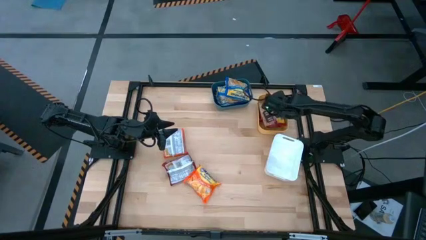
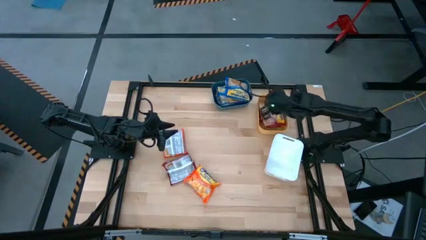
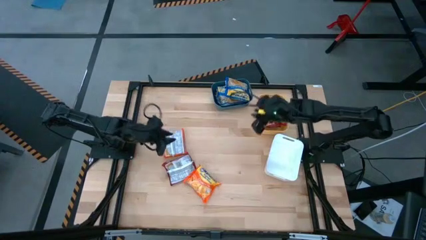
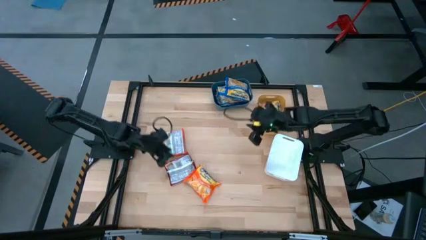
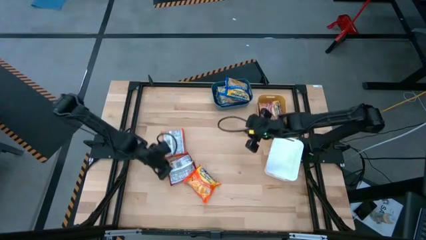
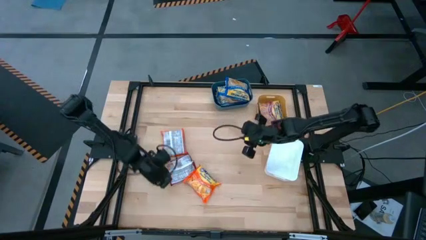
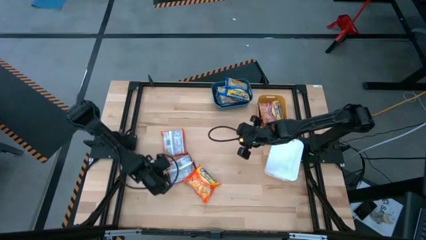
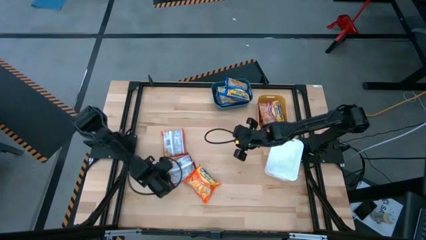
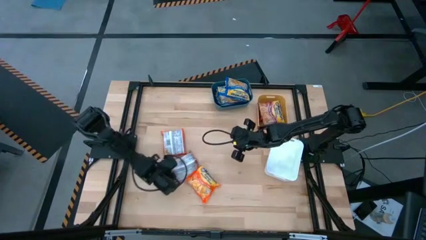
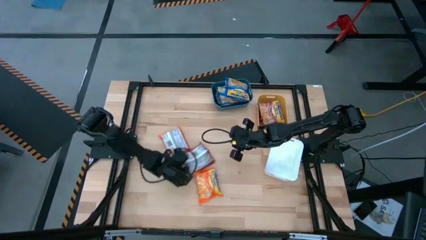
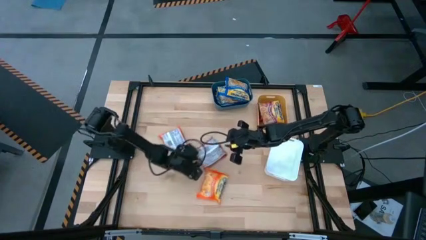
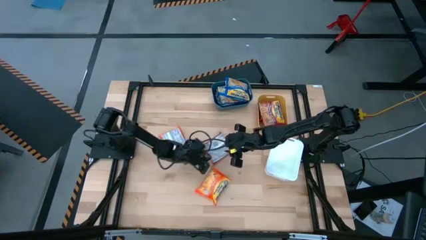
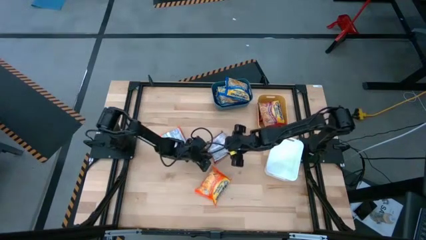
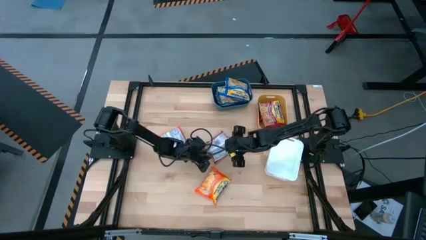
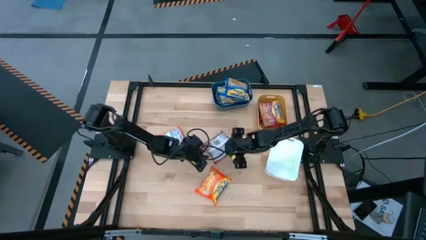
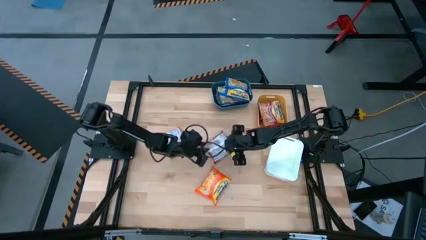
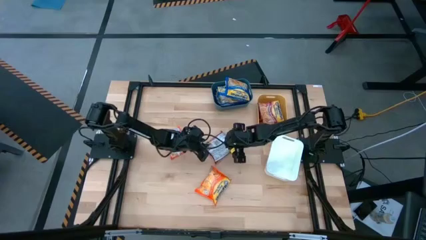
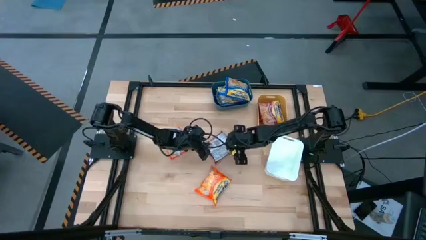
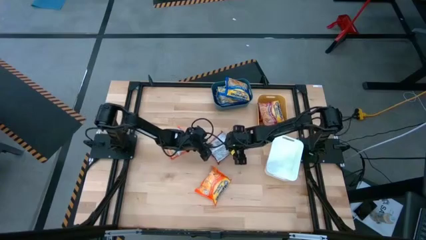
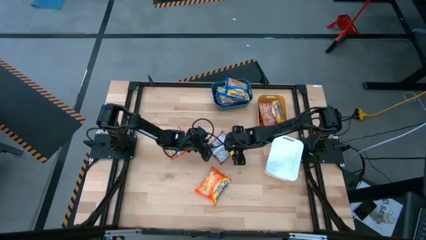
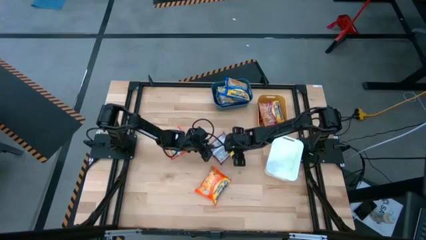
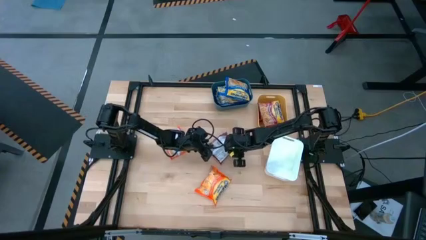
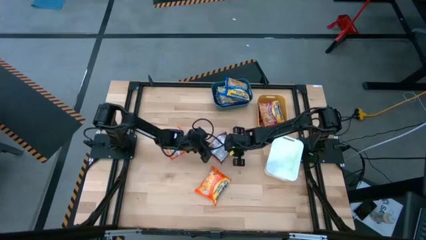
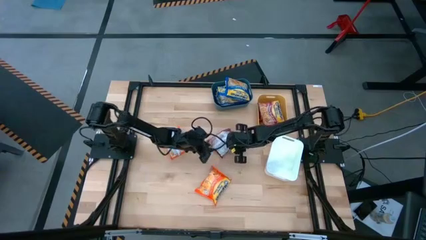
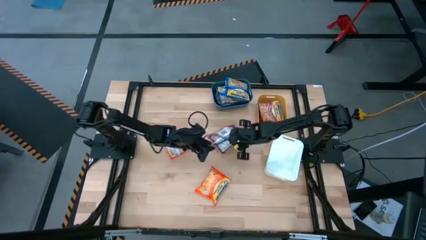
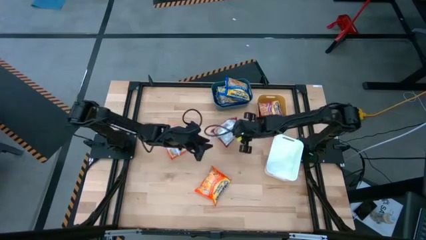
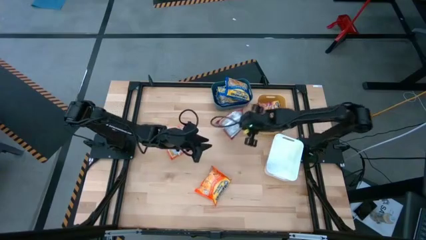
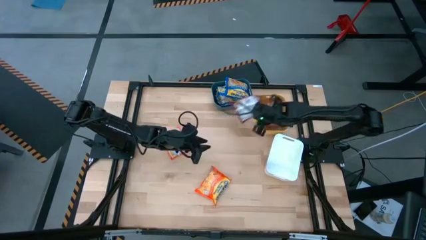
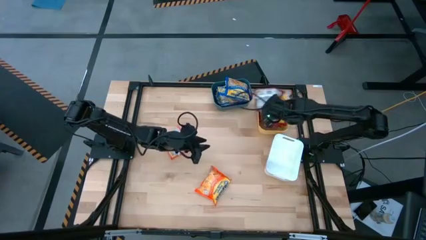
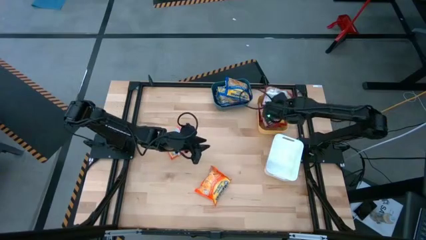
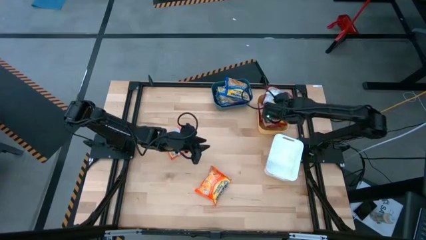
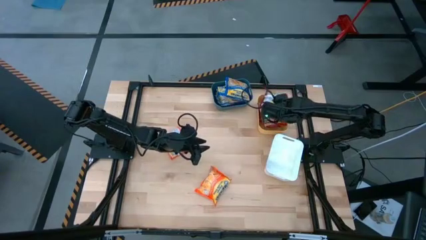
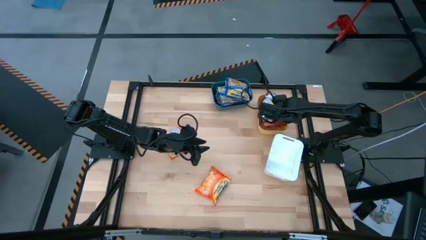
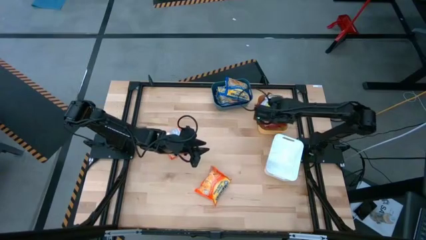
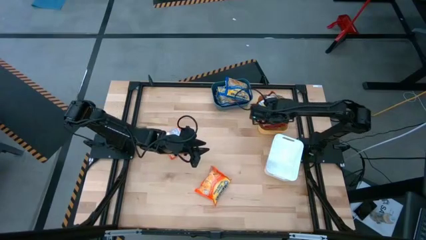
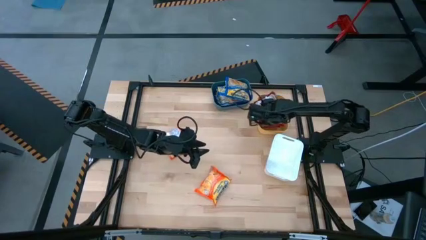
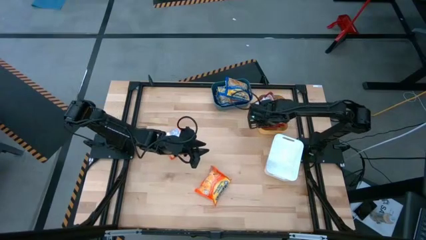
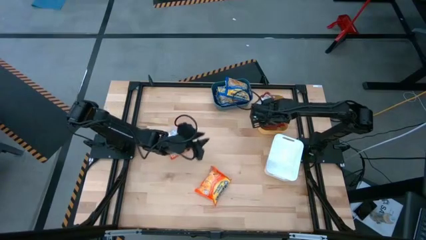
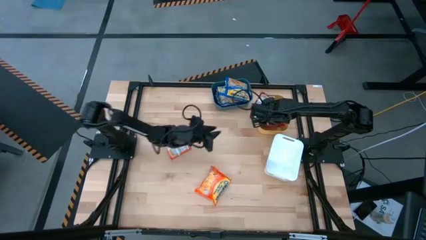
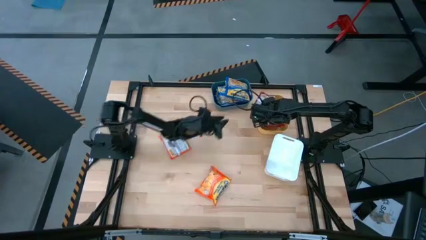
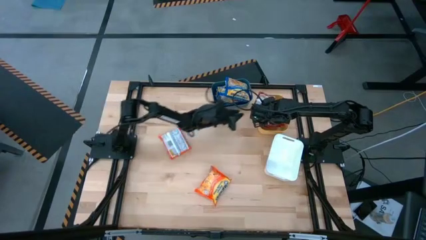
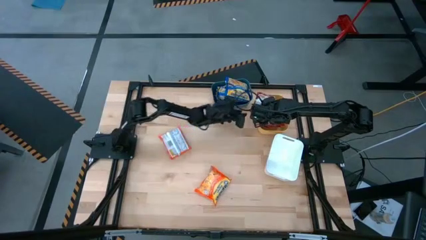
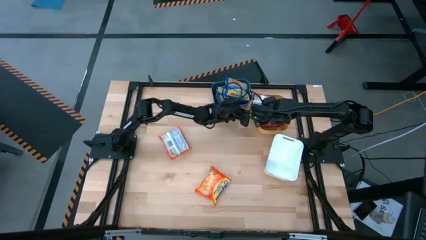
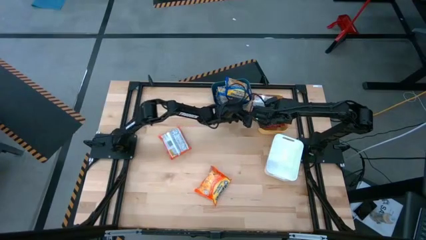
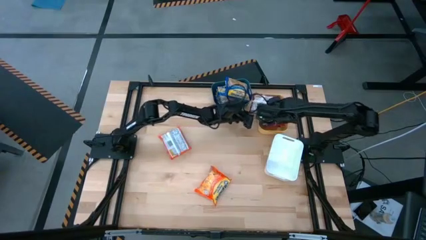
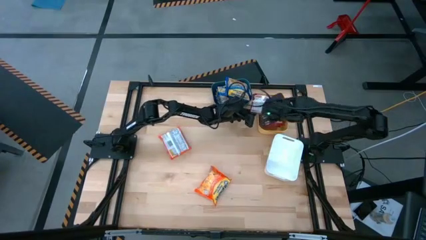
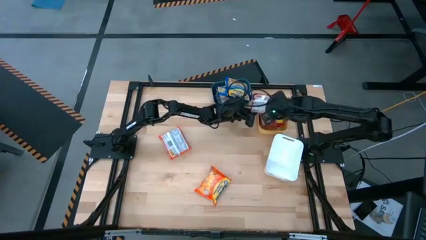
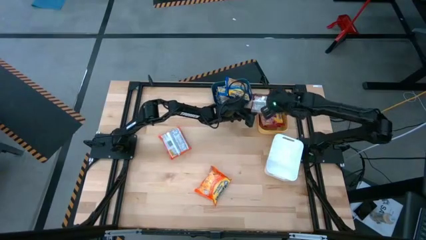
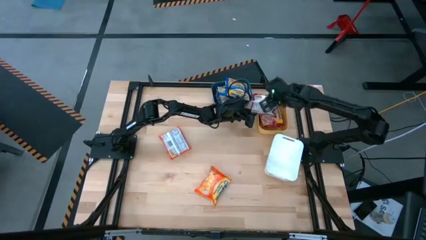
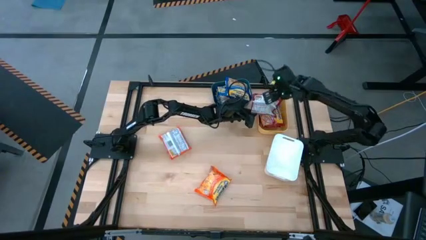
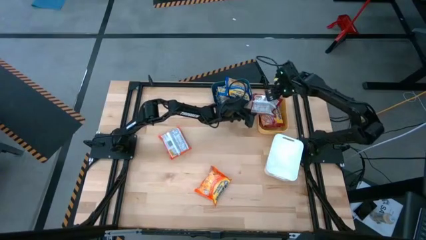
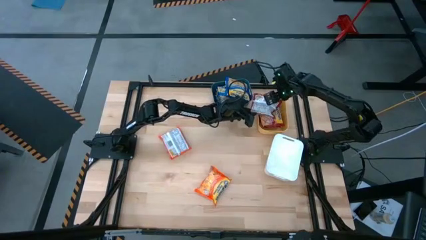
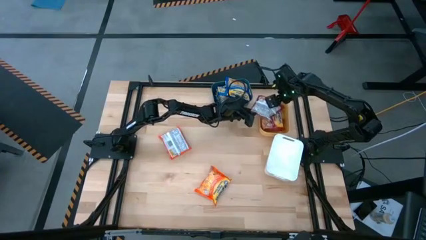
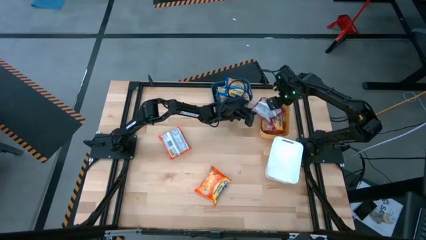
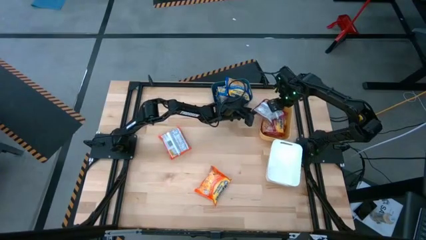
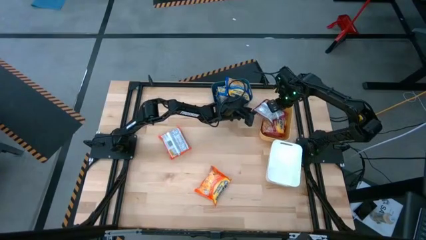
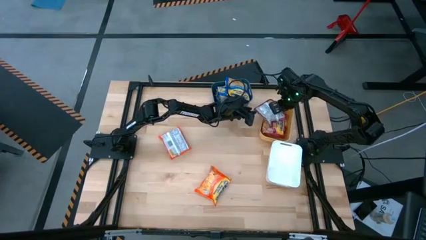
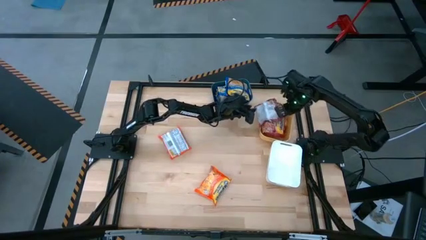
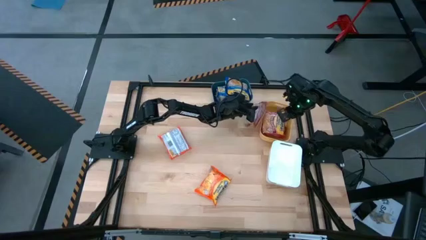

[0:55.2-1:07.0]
Task: Sort Maruchan noodles
Put the red noodle pack into the yellow bin

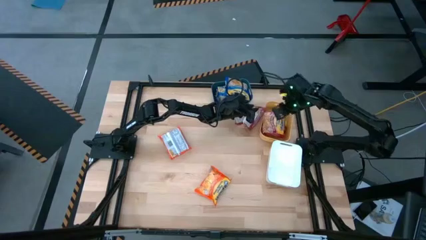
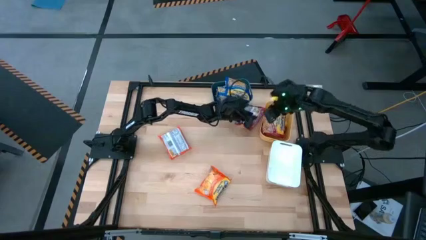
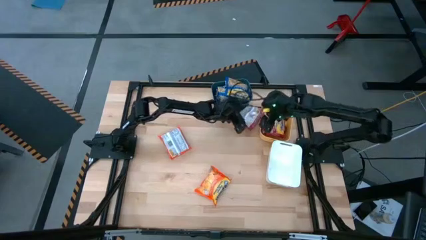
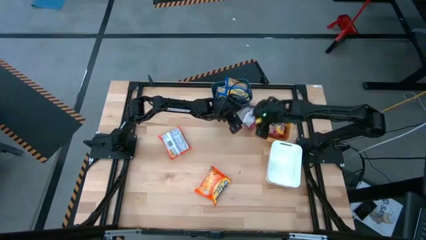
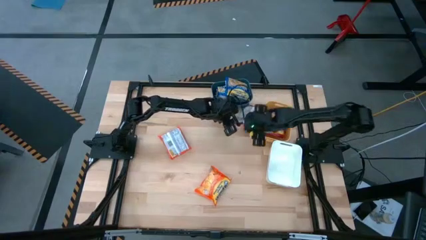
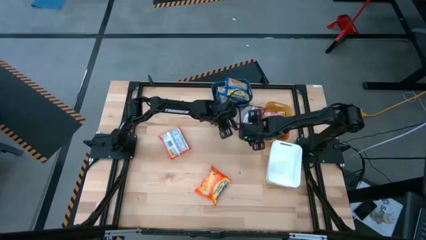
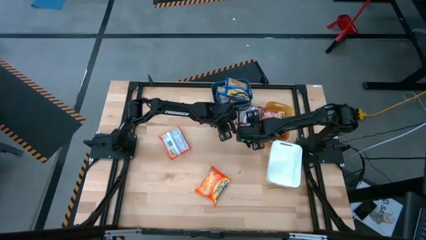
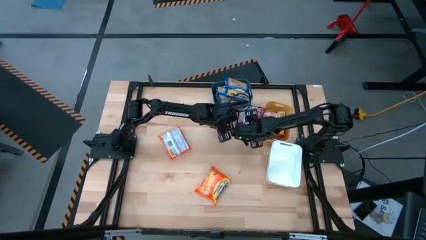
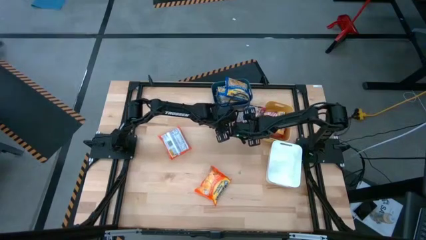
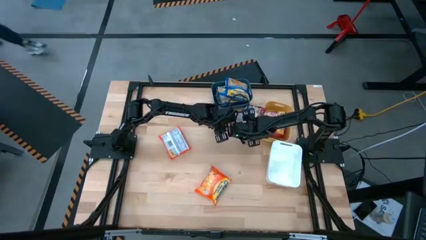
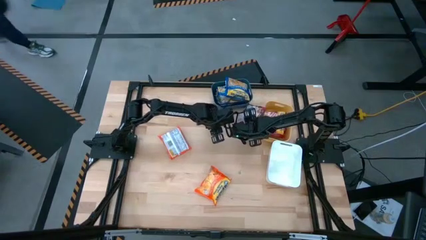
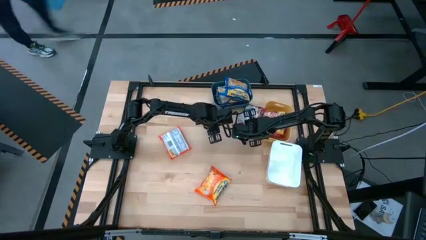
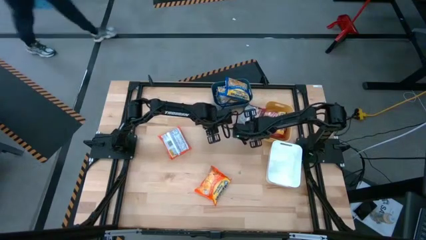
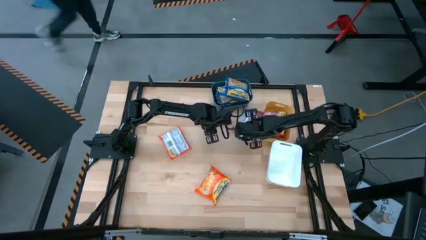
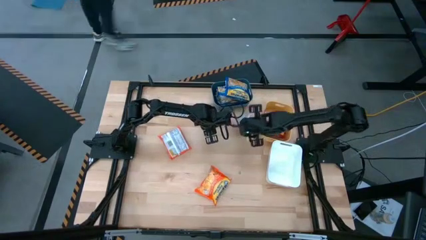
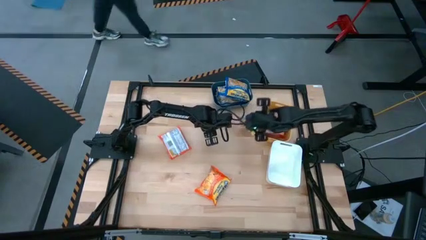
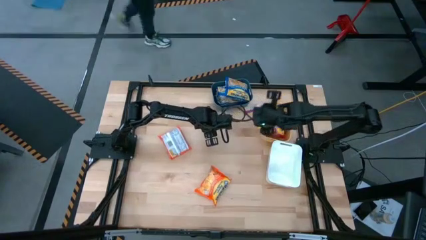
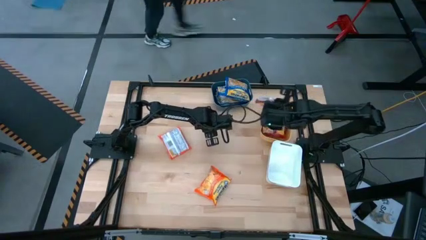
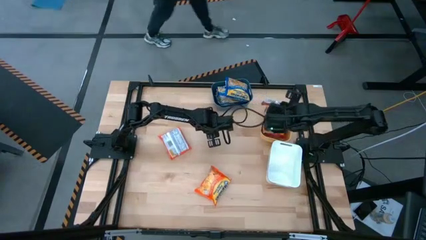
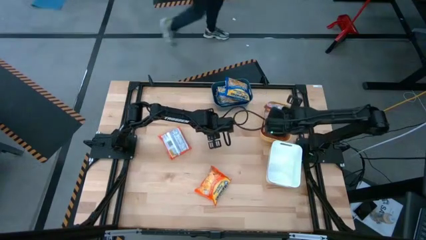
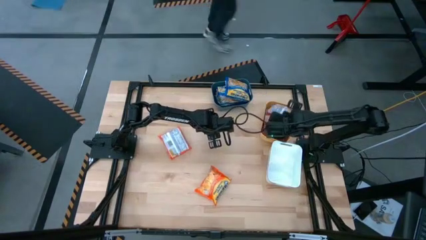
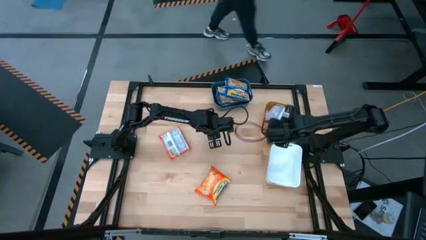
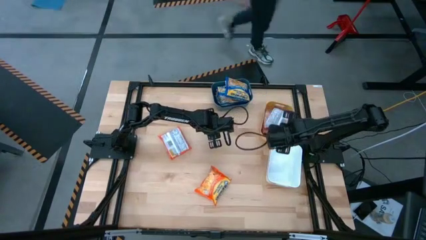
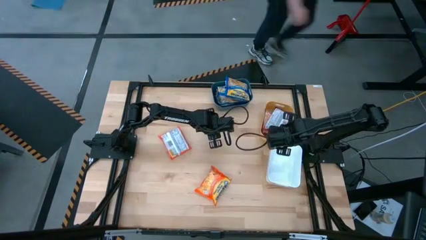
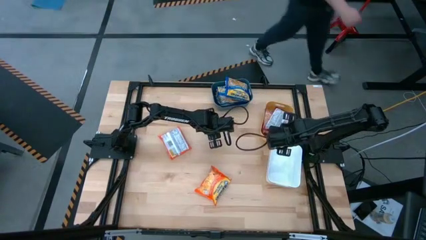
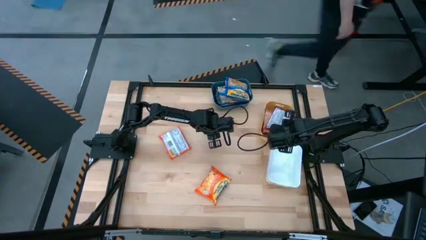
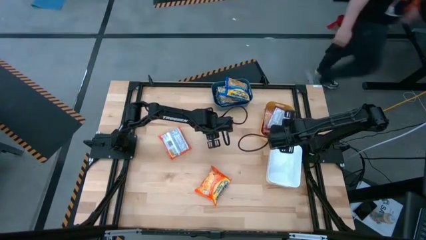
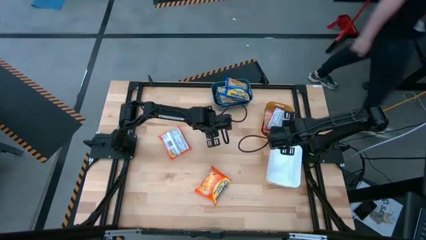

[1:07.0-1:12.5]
Put the red noodle pack into the yellow bin
